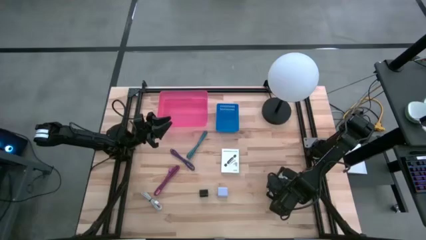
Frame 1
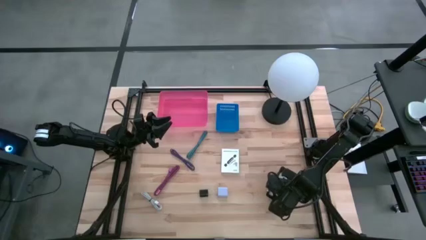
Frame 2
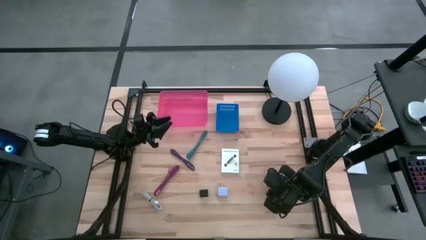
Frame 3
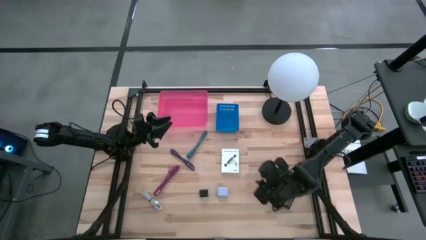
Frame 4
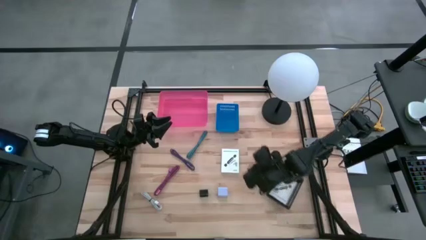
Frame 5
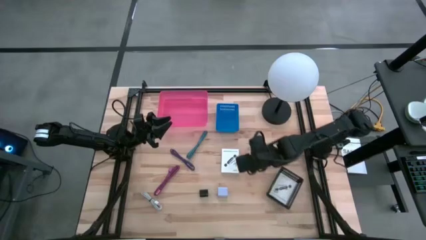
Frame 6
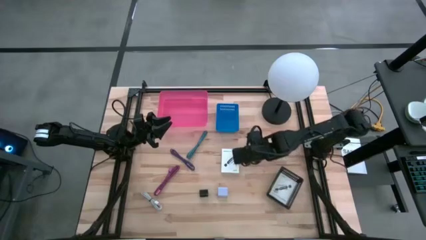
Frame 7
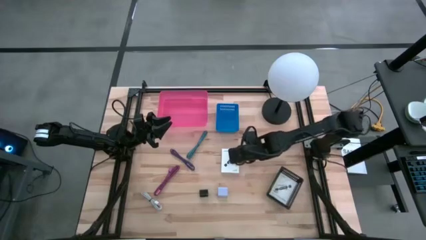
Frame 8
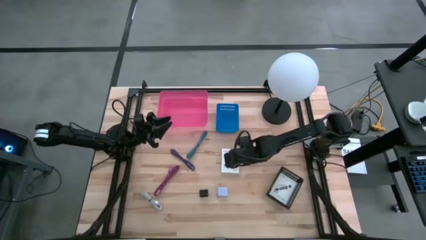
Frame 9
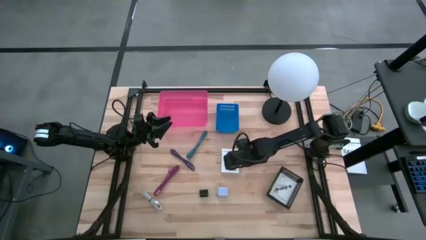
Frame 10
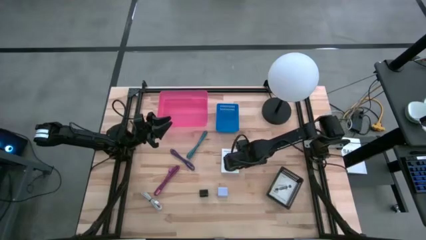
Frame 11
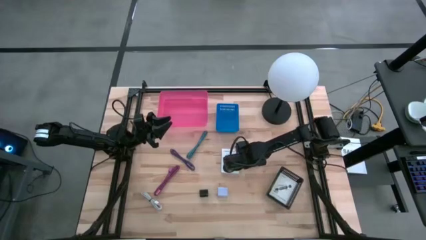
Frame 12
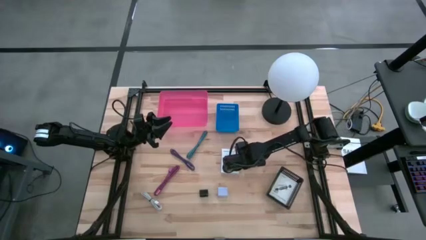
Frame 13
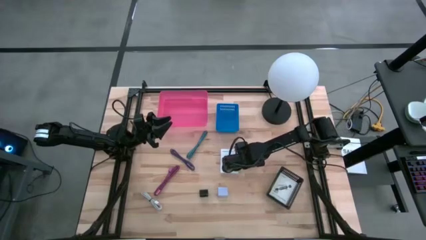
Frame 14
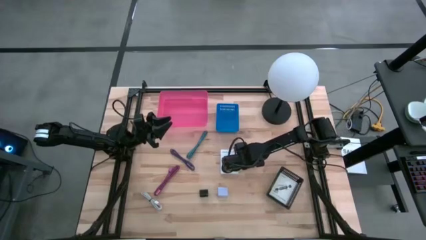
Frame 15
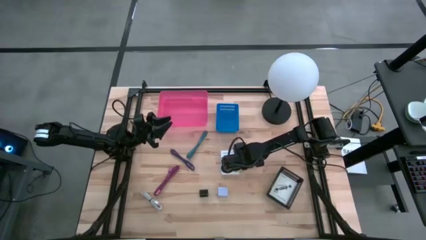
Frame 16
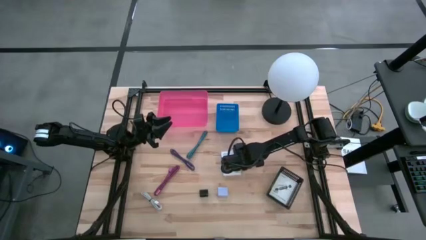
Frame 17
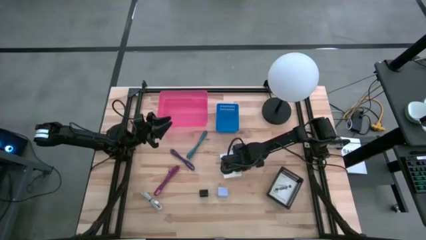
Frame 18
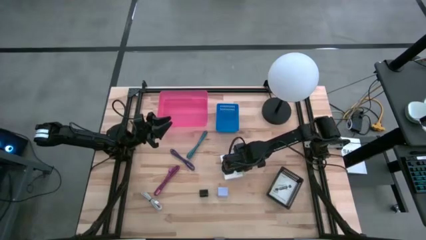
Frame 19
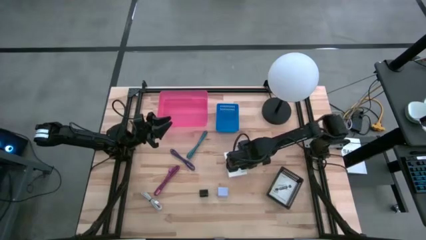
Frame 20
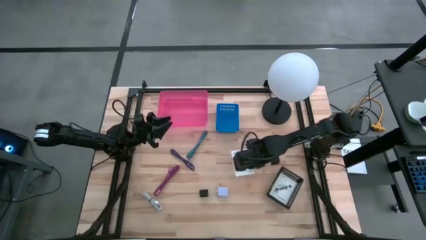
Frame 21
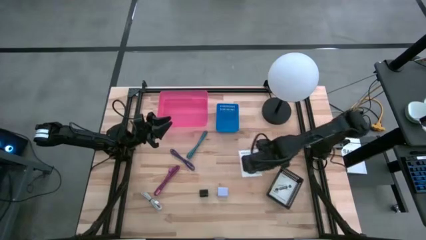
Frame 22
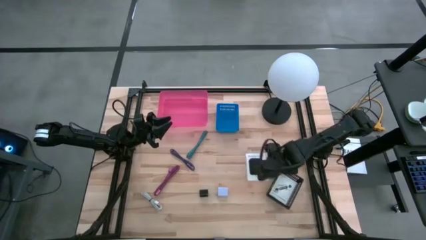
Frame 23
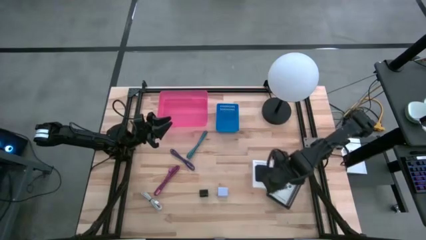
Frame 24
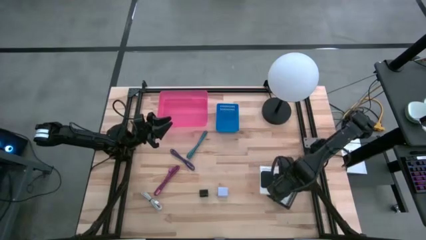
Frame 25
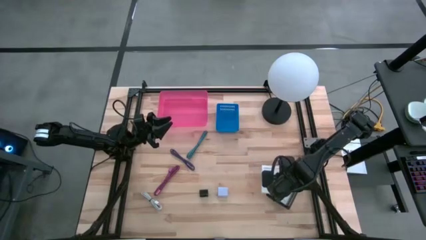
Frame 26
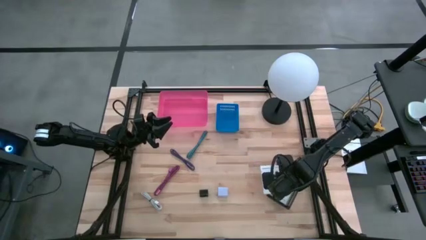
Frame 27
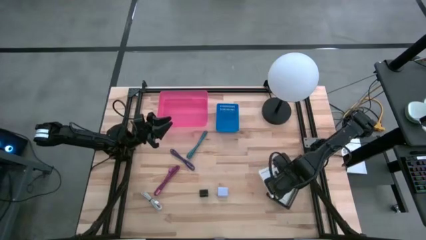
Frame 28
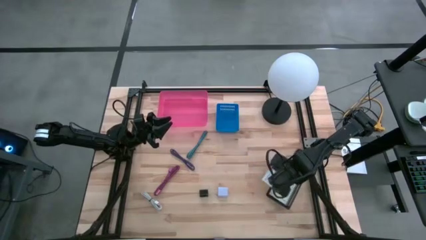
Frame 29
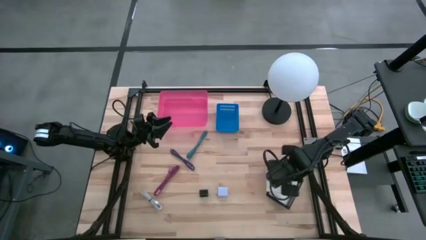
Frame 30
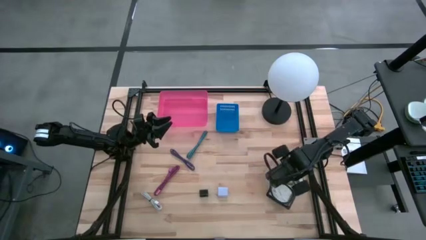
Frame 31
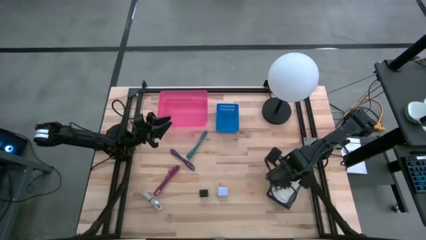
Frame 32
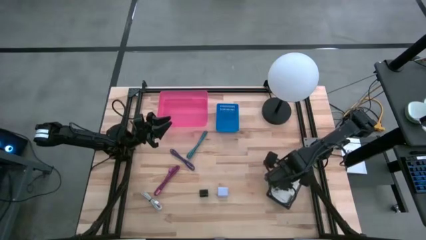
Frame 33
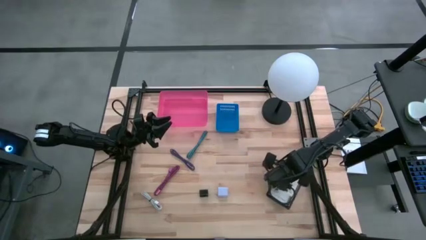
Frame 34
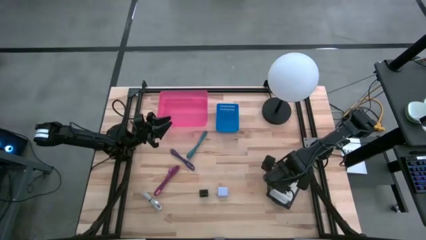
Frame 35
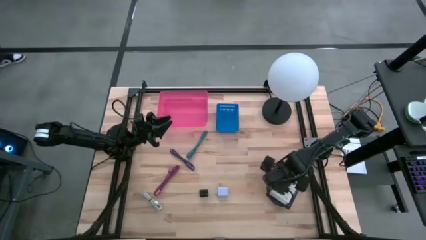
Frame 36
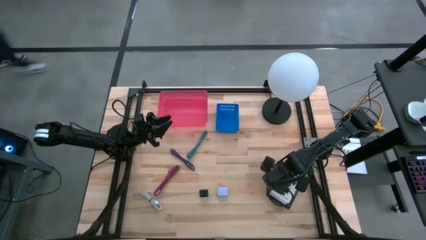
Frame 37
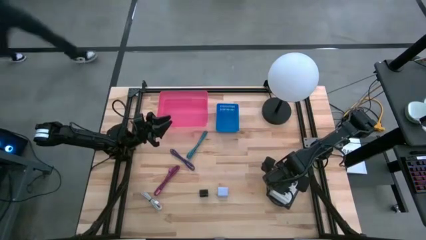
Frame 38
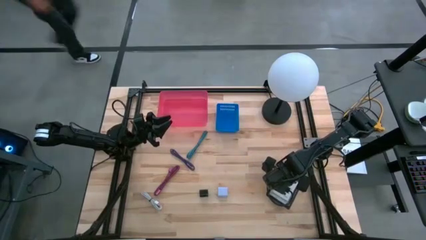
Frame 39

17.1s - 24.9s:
Task: Pick and place items into bin
Put the white card reader box into the black bin

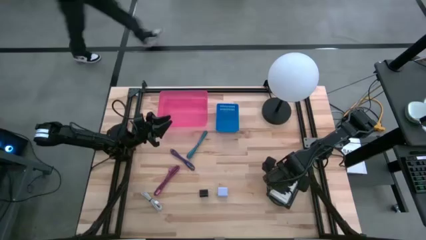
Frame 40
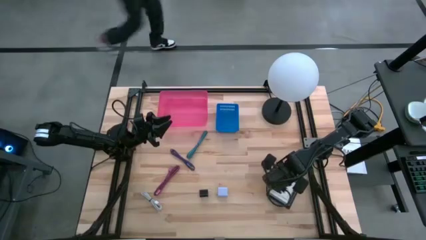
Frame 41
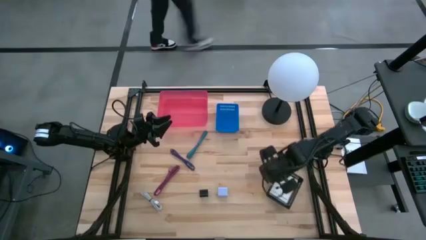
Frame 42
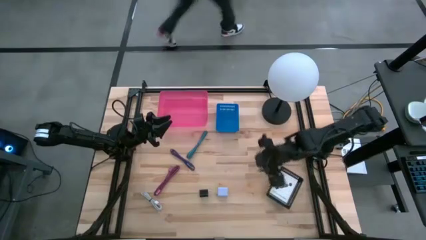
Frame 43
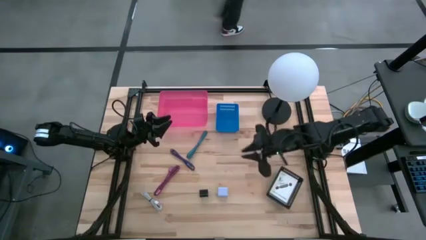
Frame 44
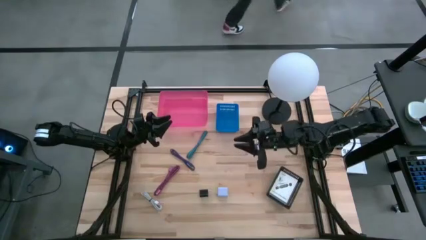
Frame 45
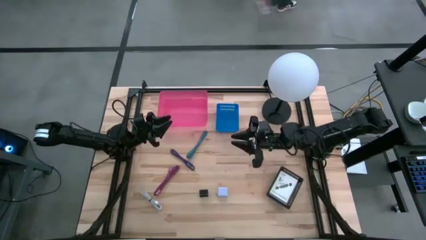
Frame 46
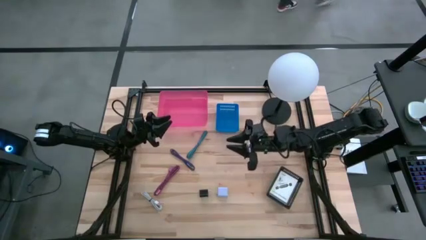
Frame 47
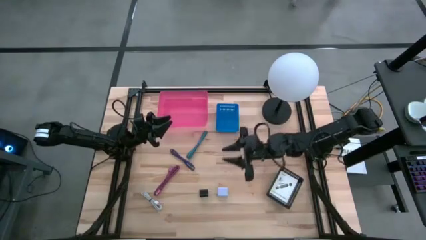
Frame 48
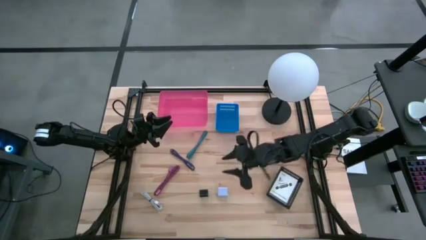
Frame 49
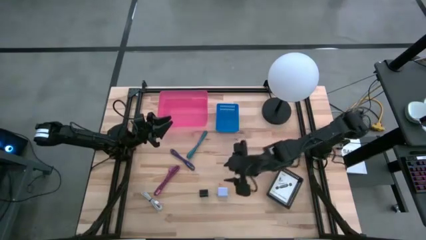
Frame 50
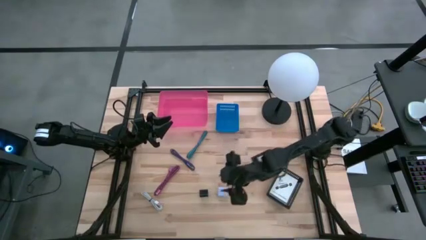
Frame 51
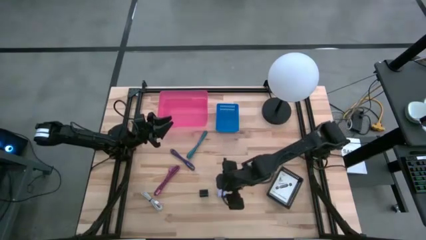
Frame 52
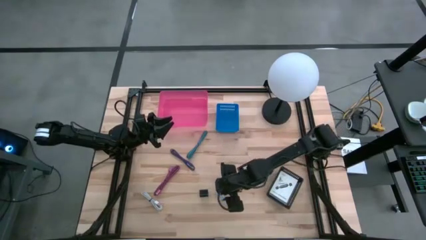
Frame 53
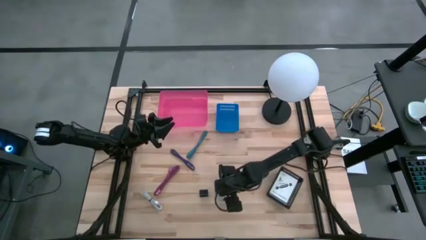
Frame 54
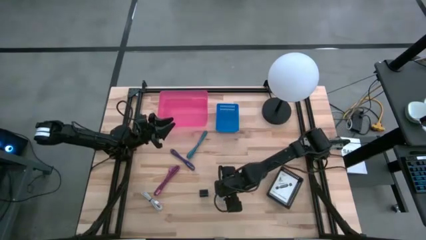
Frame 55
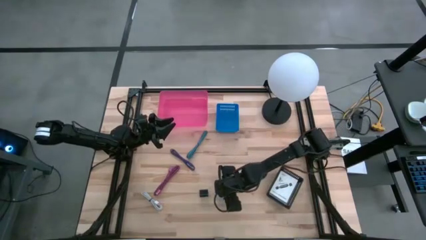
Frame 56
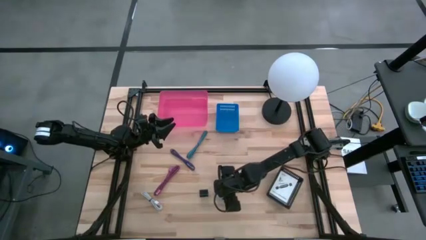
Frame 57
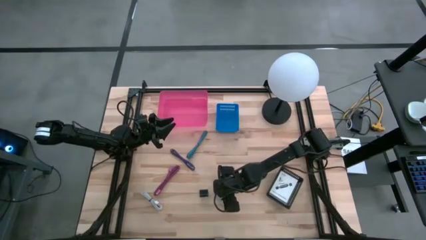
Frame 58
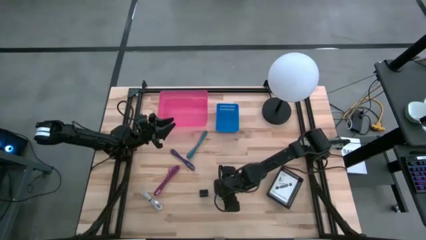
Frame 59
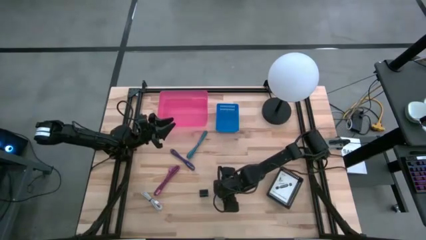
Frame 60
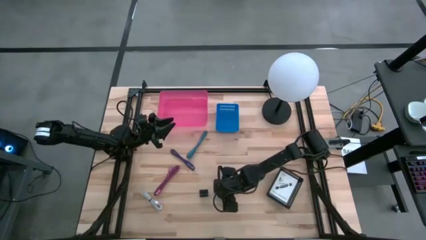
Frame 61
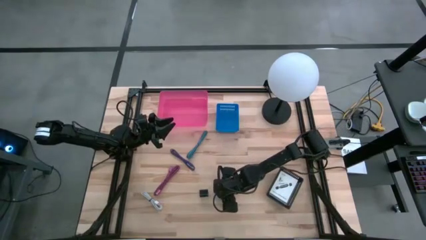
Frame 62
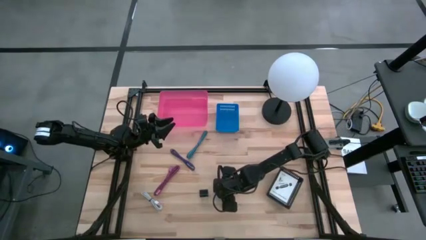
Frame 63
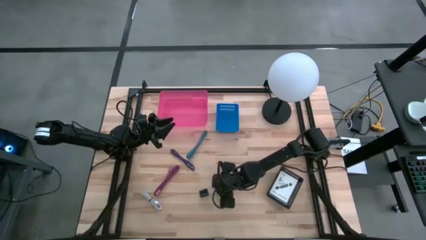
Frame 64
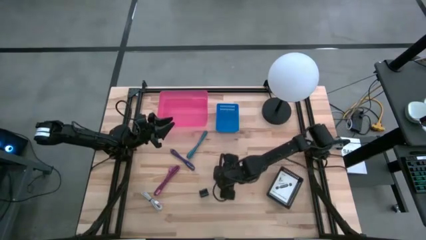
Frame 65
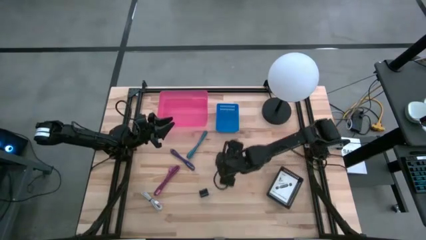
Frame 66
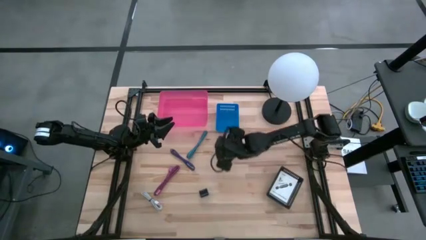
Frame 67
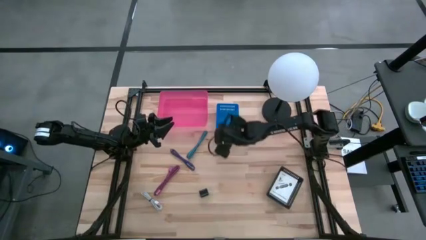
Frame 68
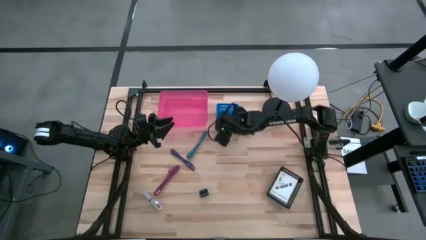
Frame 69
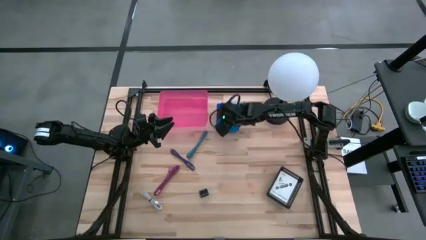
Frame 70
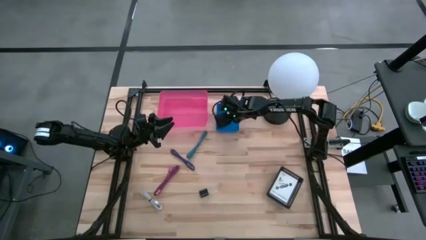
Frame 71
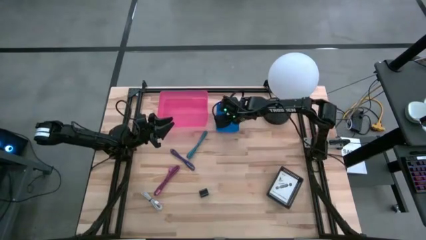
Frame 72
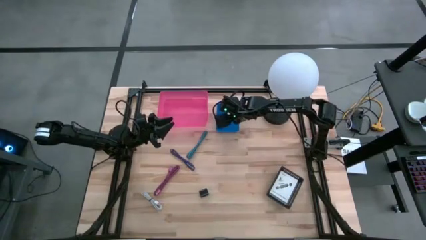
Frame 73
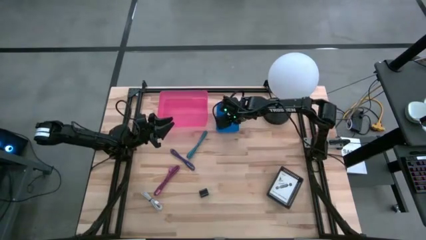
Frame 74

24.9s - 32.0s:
Put the white charger adapter into the blue bin
